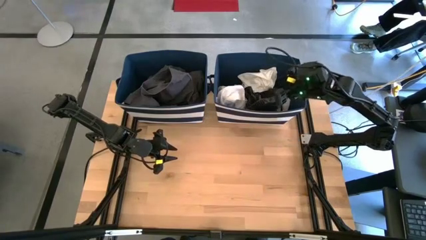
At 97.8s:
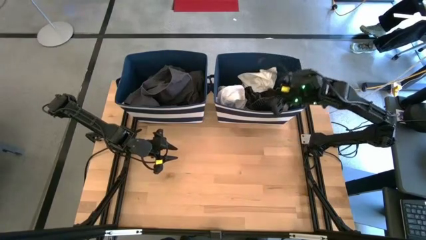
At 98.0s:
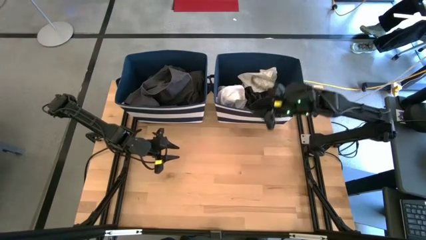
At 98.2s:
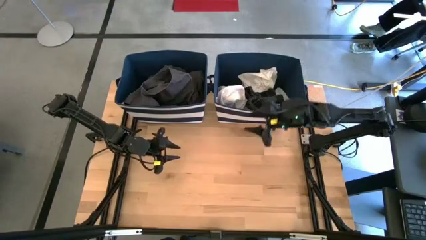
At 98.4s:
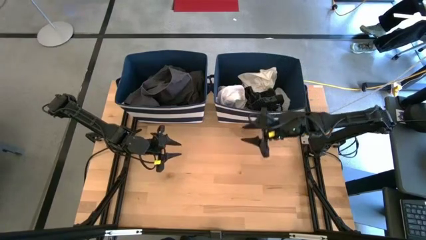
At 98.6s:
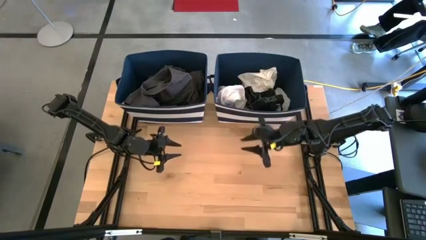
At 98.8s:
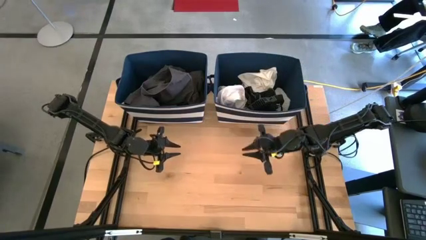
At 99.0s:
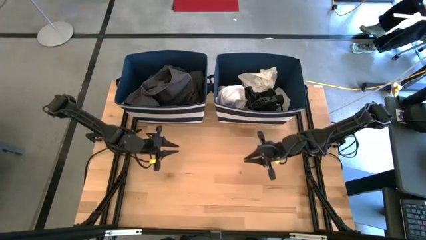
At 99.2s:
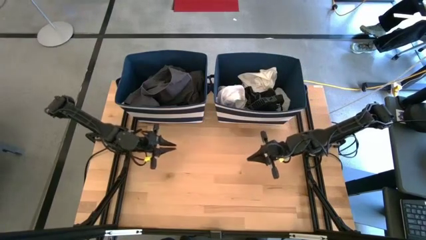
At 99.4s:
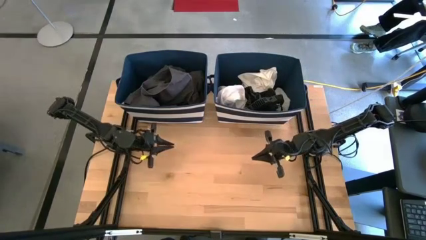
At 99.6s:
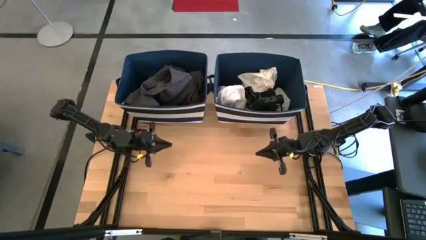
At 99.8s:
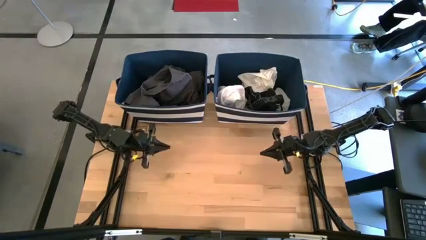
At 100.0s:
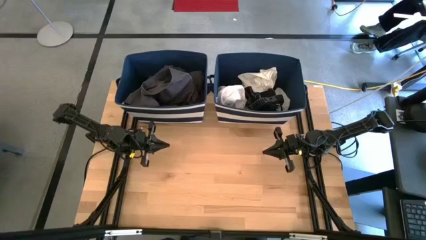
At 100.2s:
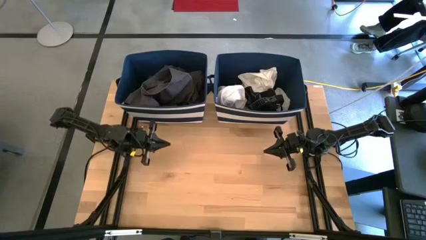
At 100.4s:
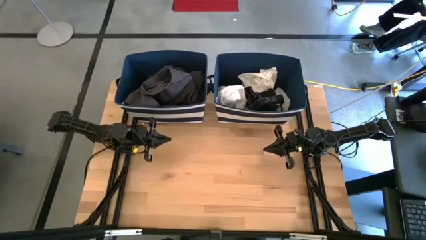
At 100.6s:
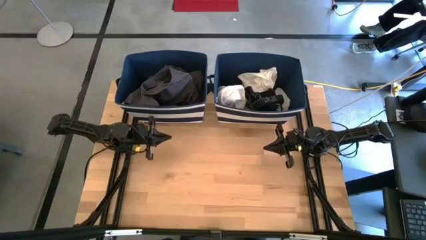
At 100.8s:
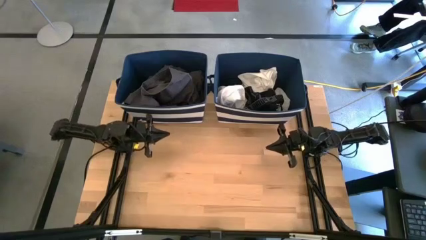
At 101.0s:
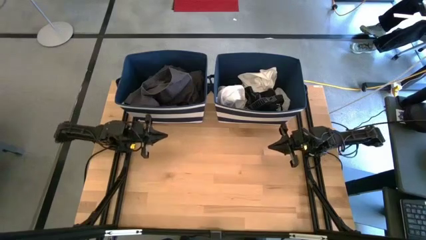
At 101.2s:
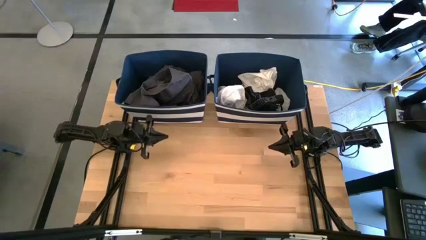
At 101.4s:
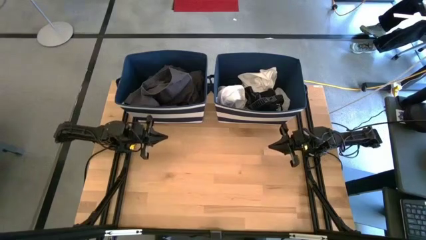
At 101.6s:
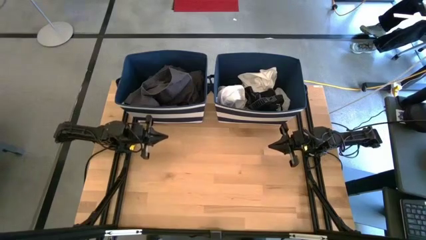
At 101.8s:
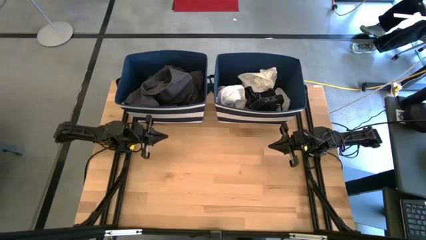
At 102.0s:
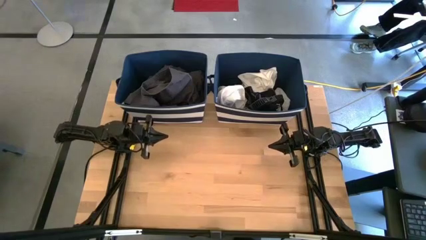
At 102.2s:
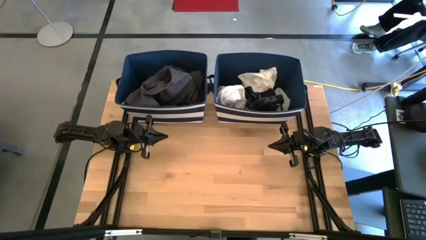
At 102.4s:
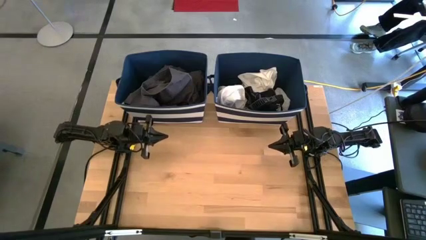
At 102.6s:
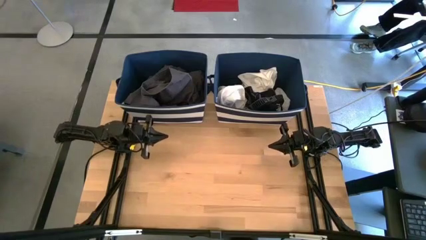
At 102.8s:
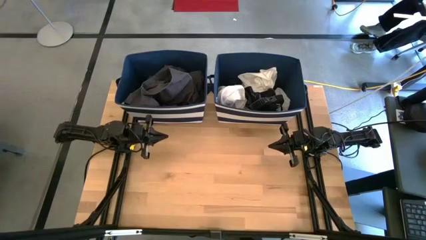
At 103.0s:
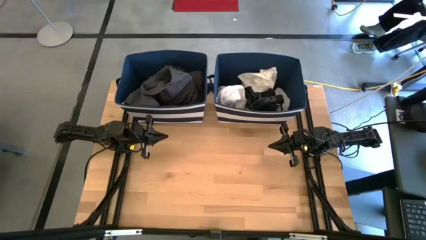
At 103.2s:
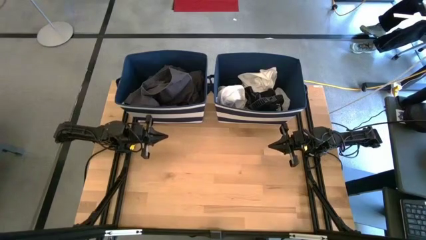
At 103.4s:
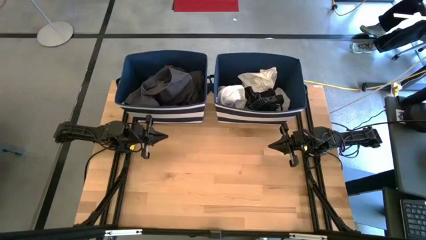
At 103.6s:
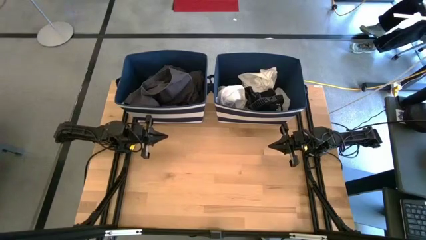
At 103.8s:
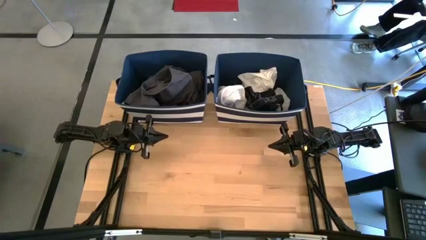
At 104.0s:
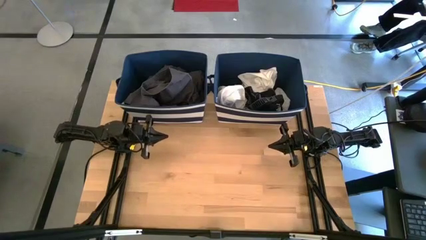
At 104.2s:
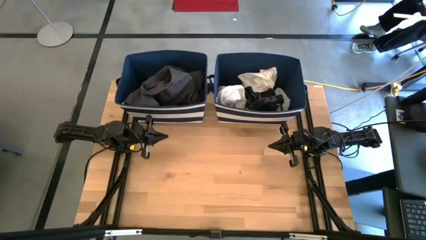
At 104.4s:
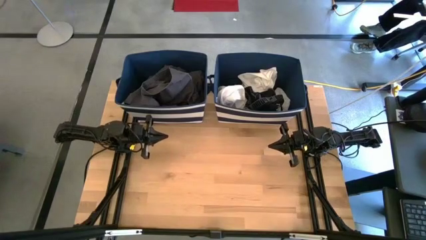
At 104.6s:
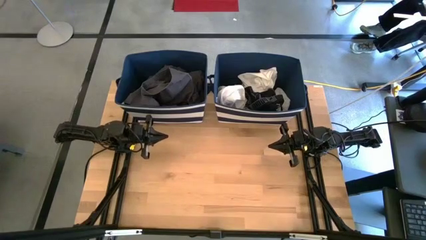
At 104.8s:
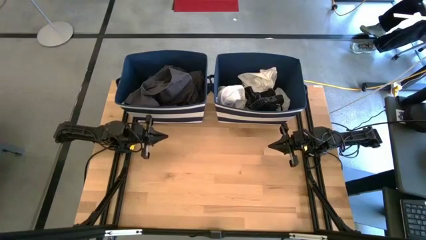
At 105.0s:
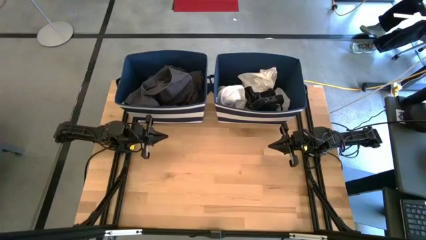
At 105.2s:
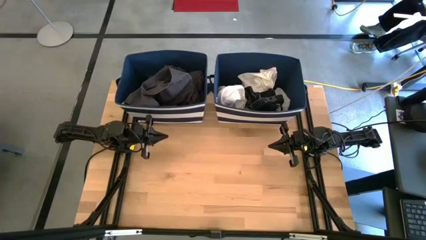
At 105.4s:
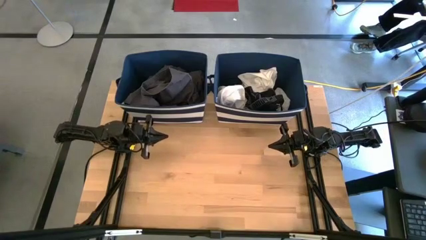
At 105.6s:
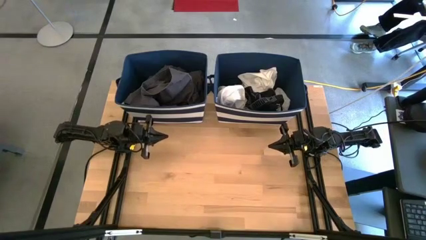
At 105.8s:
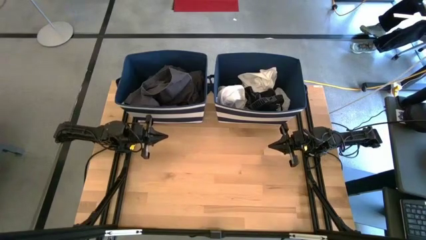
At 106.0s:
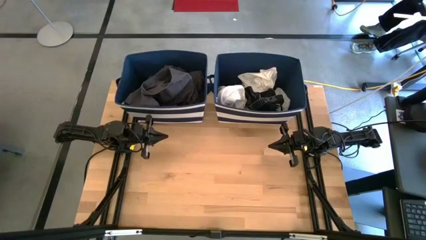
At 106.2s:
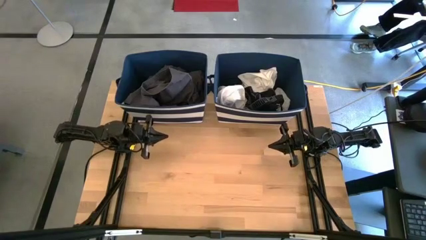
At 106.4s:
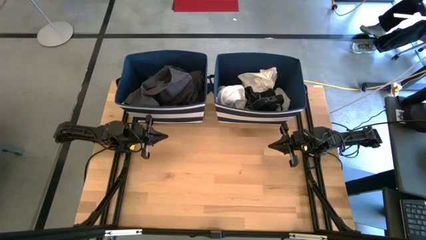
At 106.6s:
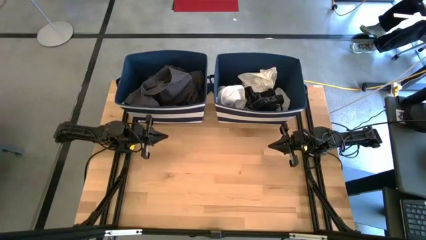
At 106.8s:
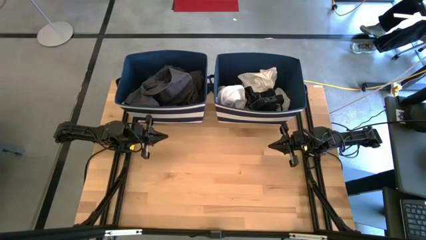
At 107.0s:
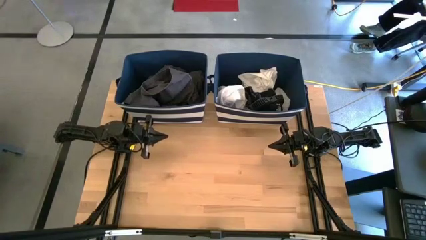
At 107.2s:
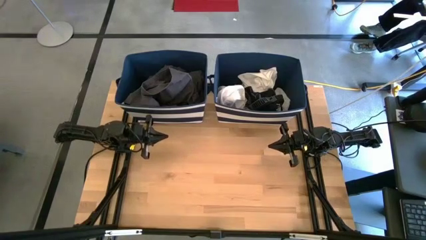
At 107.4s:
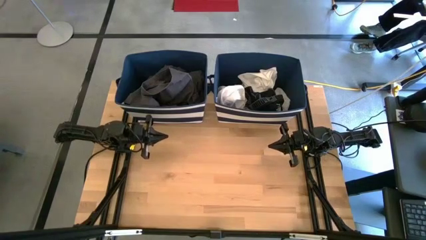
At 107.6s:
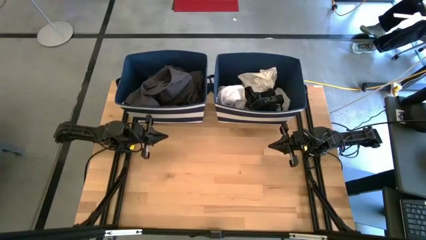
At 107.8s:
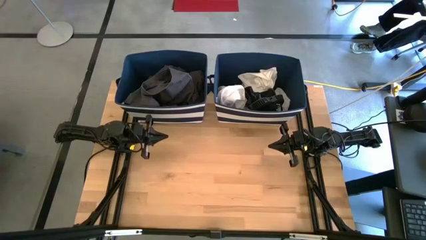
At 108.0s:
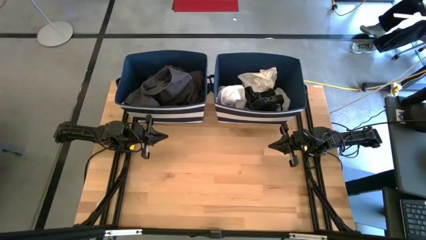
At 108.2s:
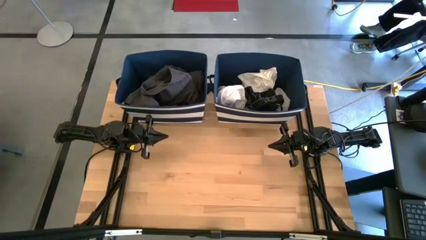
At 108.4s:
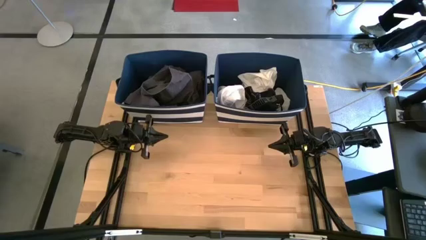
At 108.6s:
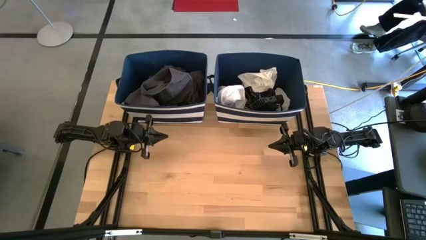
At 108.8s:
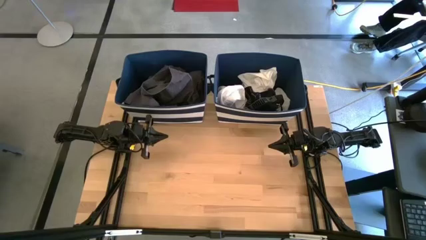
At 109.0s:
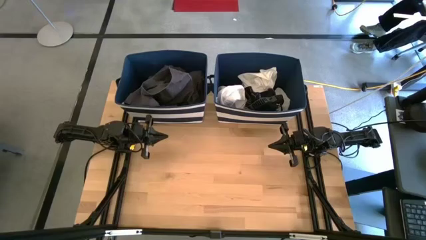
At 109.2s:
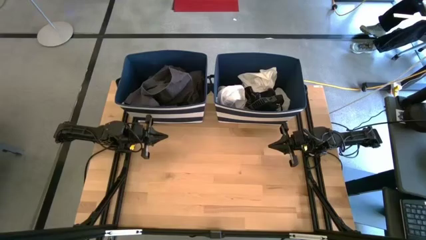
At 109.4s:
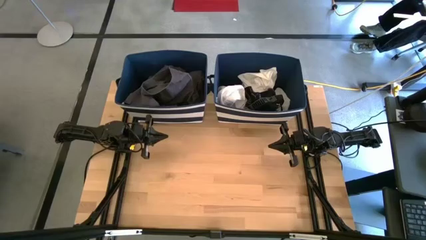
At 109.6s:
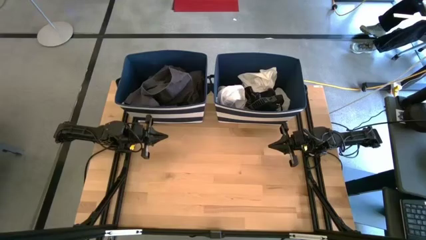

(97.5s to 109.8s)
Task: Sort clothes
Return to Home Position
